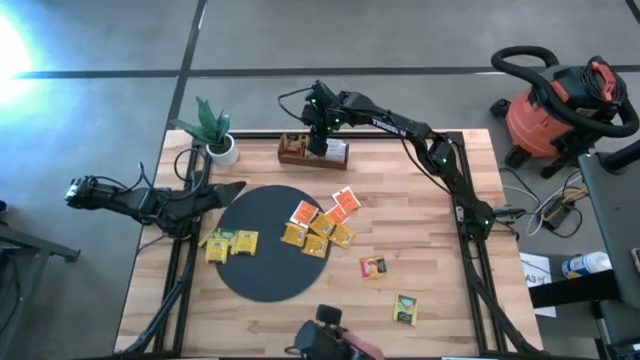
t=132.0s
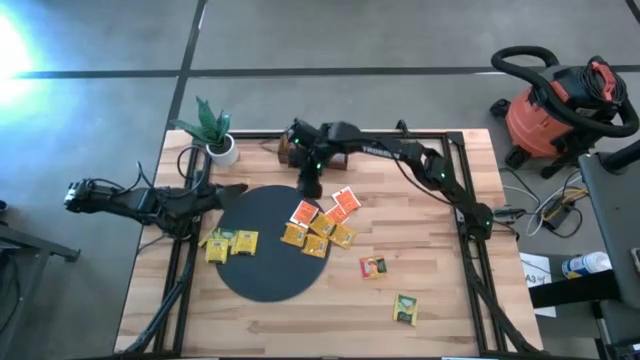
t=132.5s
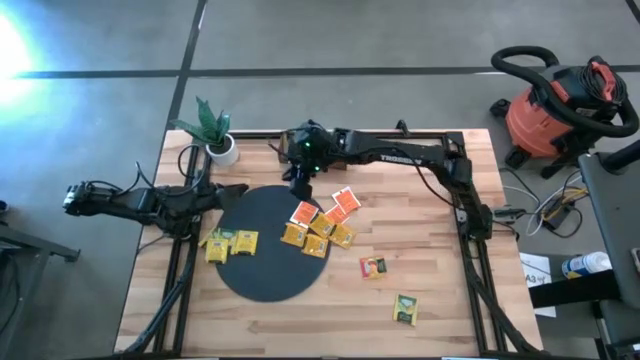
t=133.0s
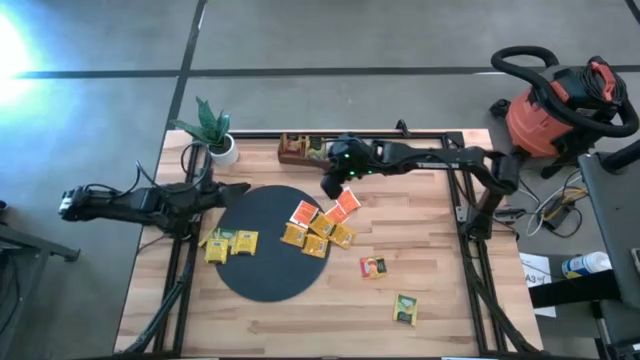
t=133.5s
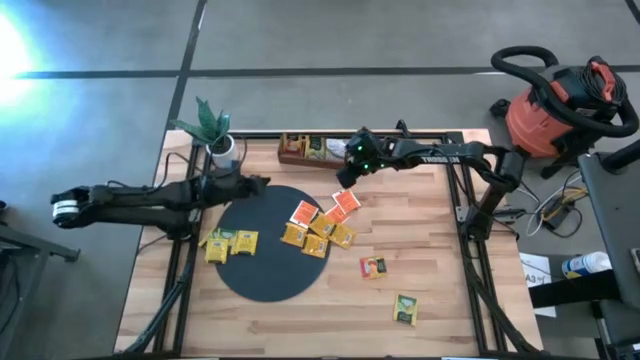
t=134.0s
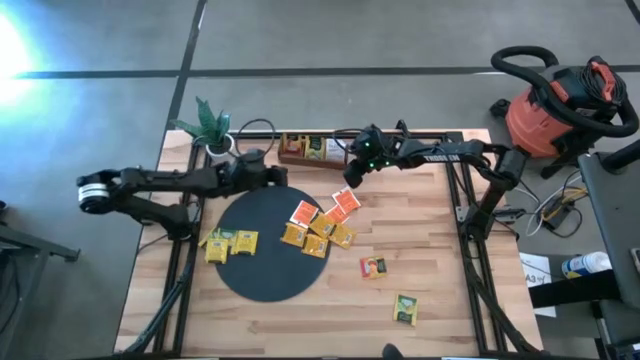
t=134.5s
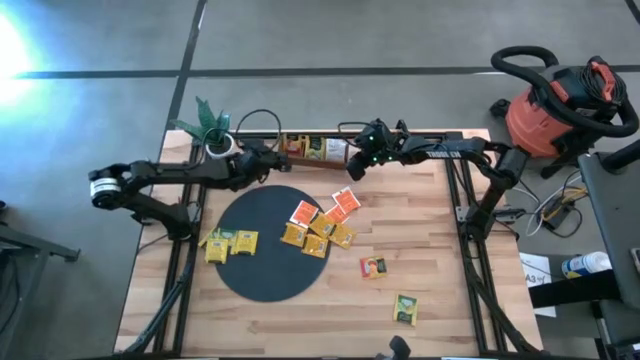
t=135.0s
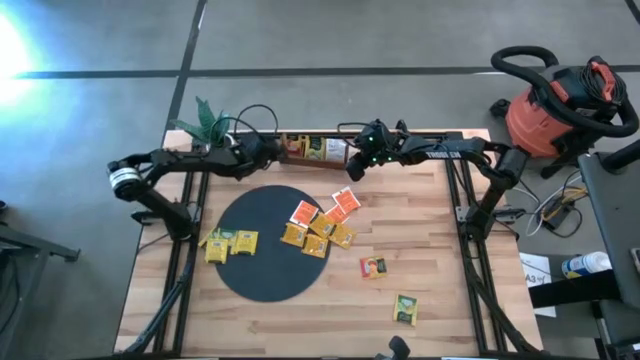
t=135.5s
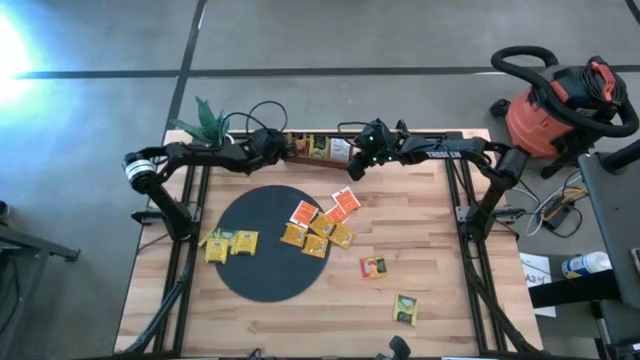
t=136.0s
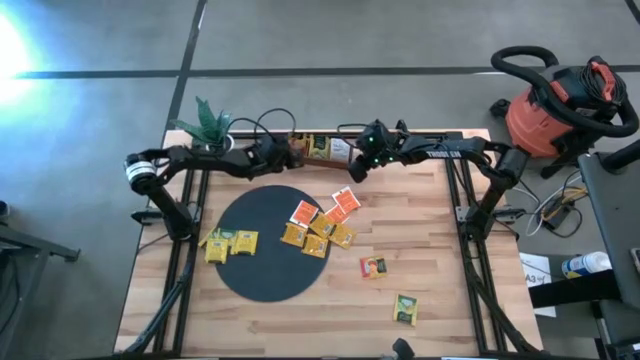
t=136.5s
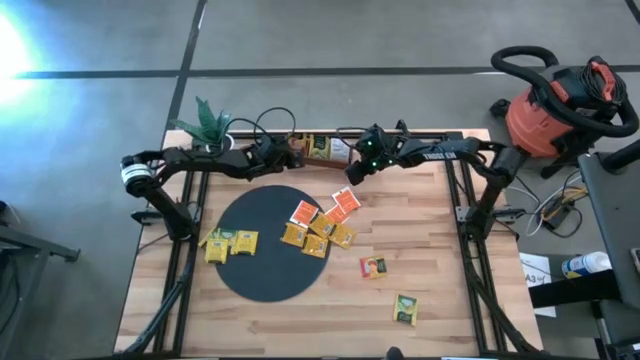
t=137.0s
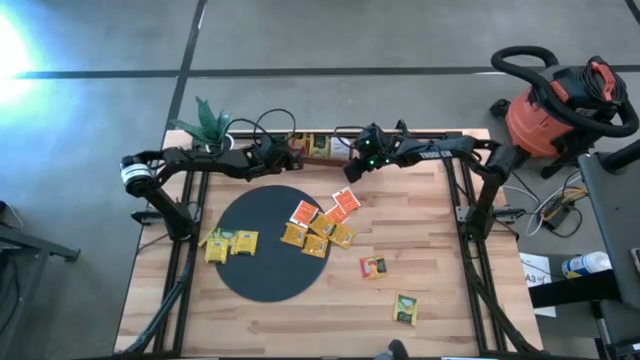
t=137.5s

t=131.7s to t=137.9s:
Task: Pick & Place Tea
Adjust the wooden organizer

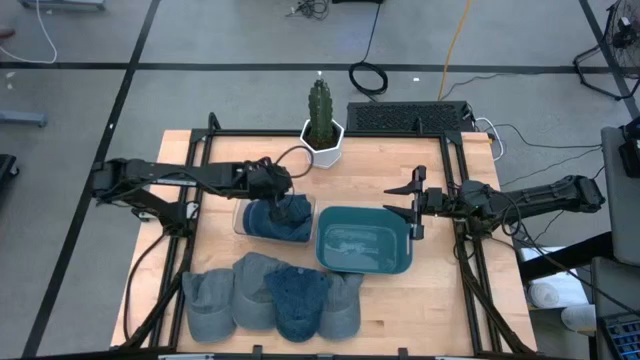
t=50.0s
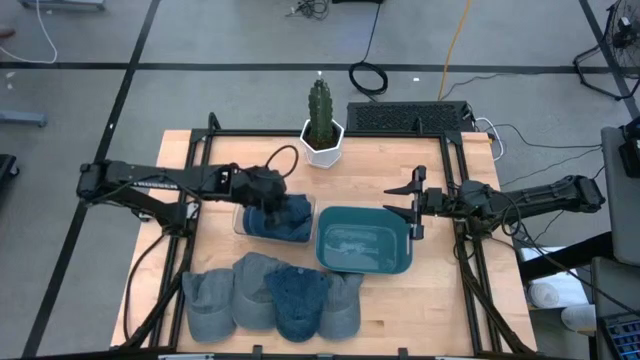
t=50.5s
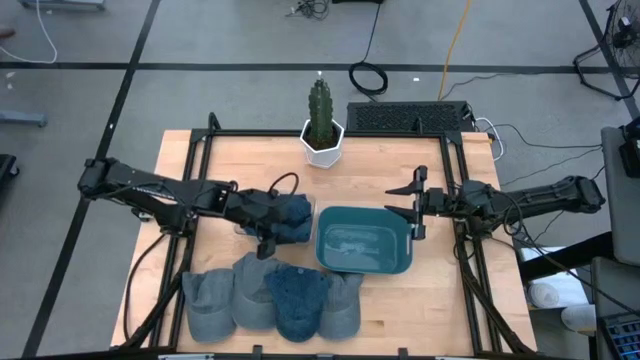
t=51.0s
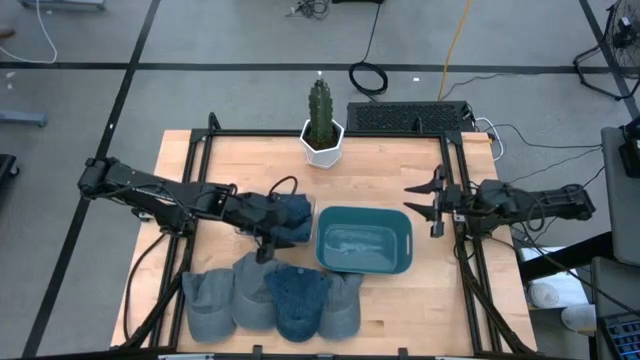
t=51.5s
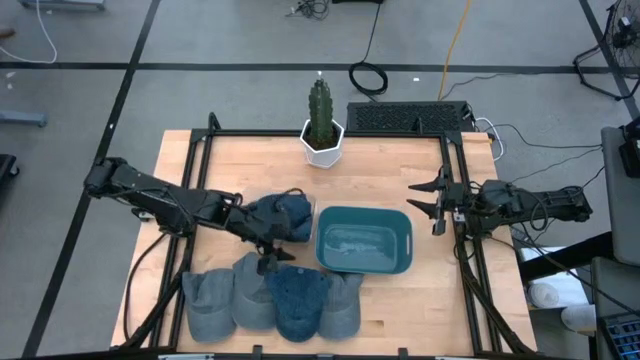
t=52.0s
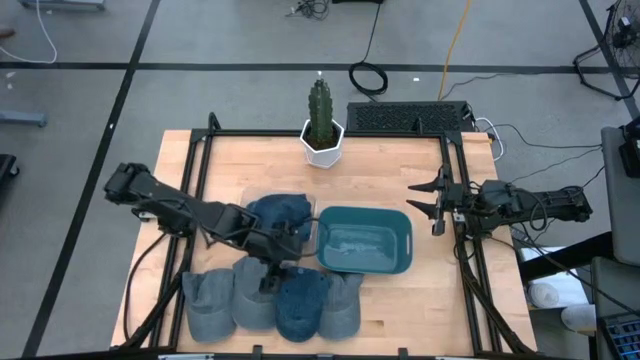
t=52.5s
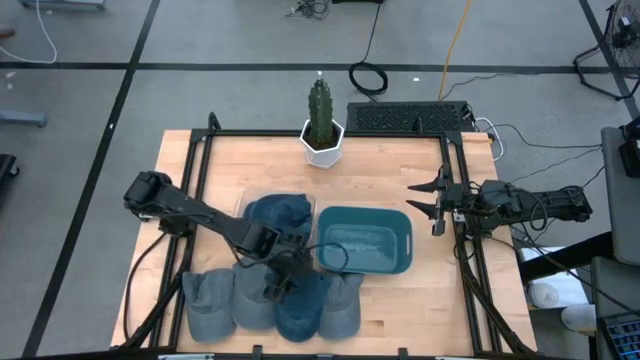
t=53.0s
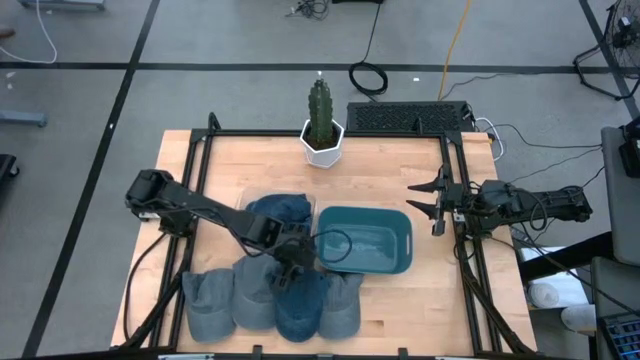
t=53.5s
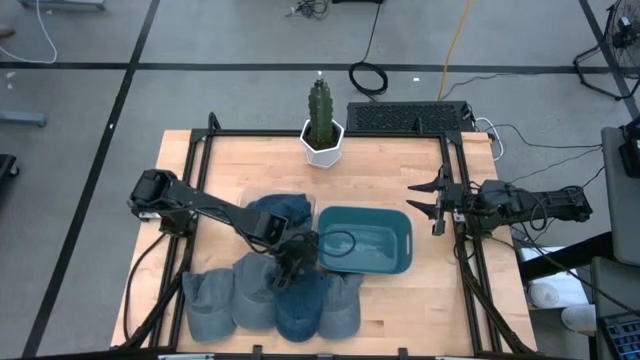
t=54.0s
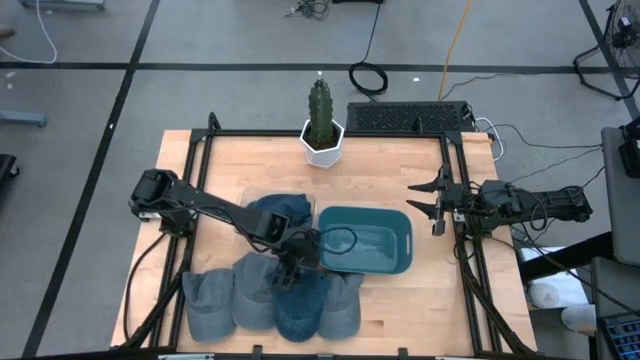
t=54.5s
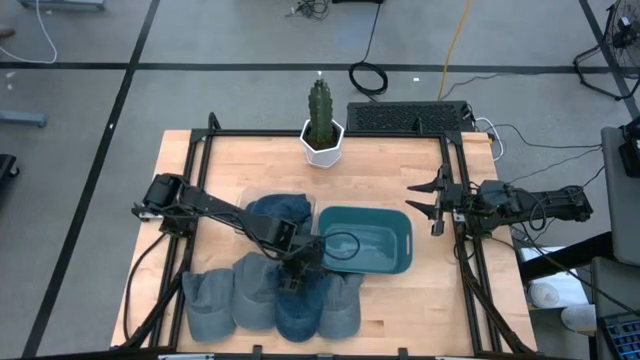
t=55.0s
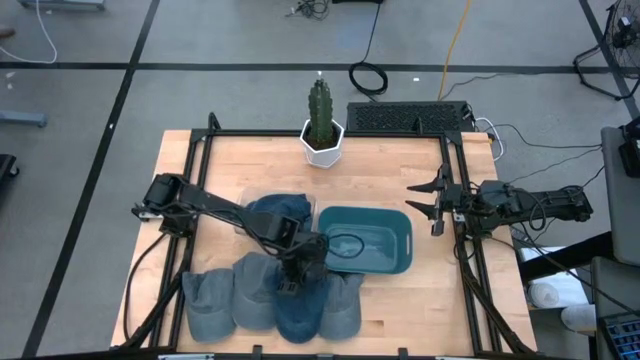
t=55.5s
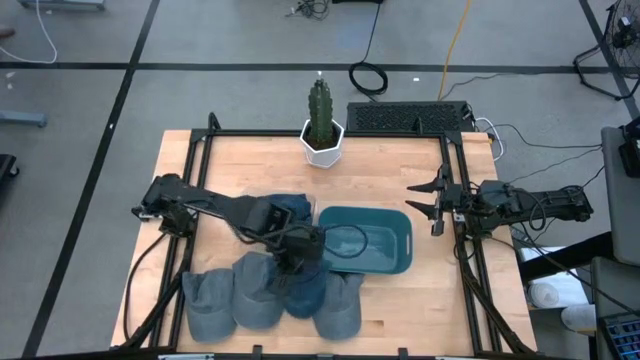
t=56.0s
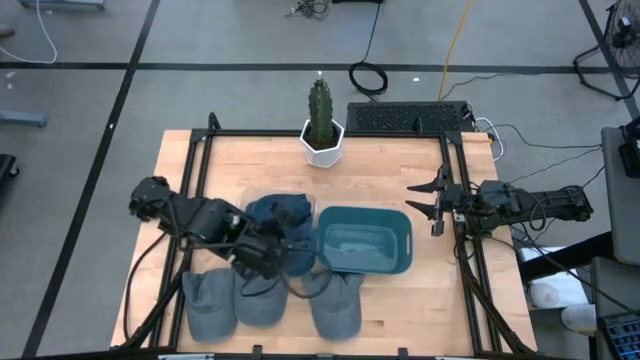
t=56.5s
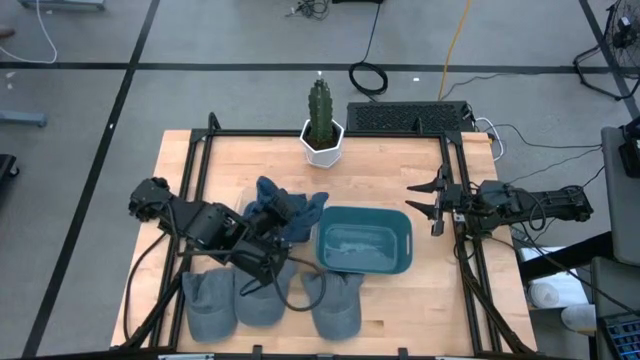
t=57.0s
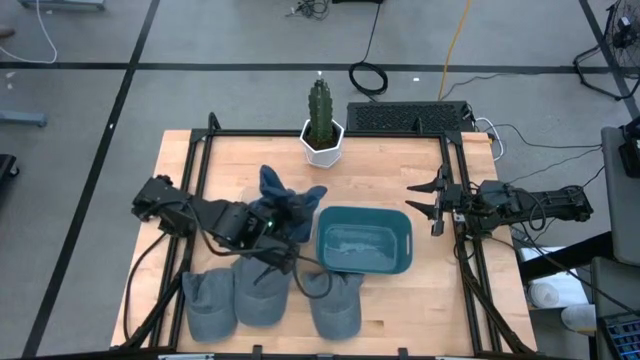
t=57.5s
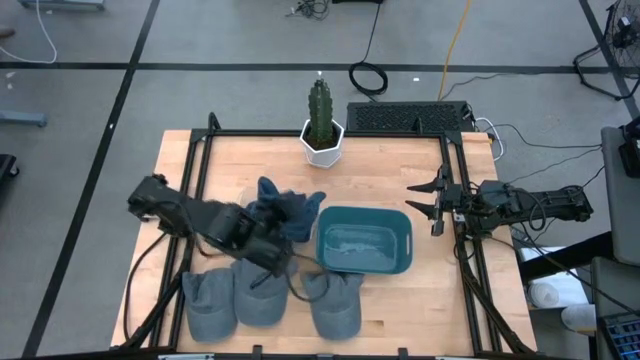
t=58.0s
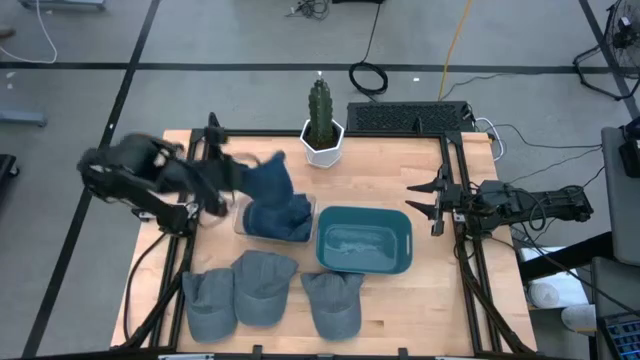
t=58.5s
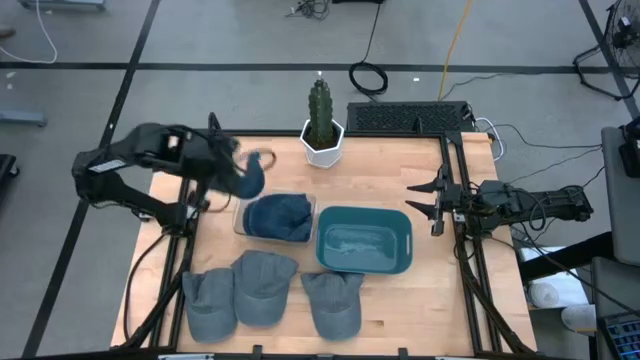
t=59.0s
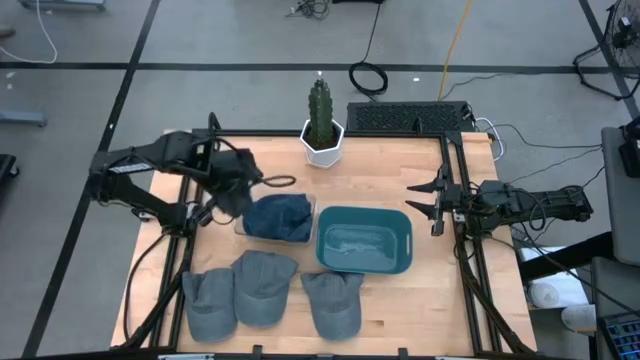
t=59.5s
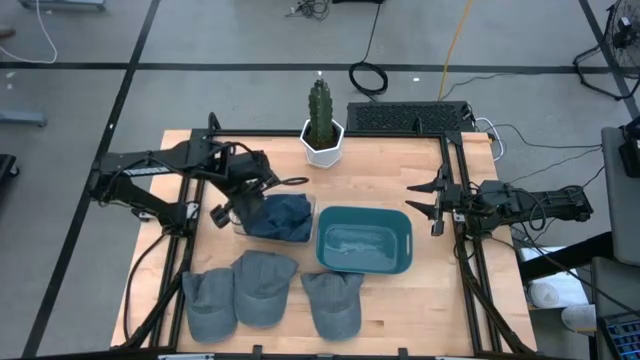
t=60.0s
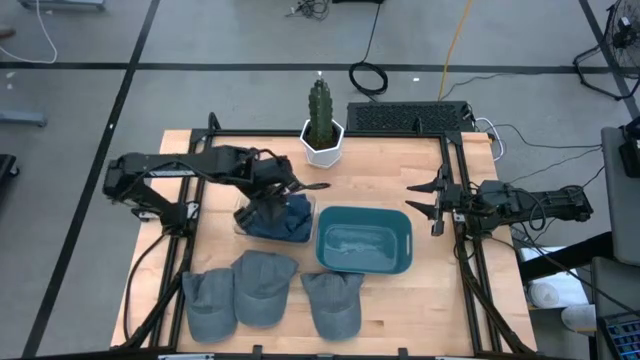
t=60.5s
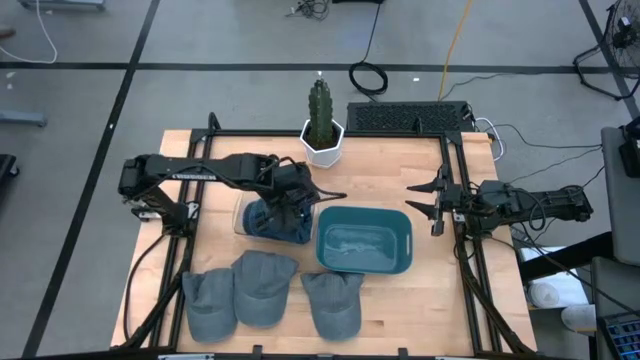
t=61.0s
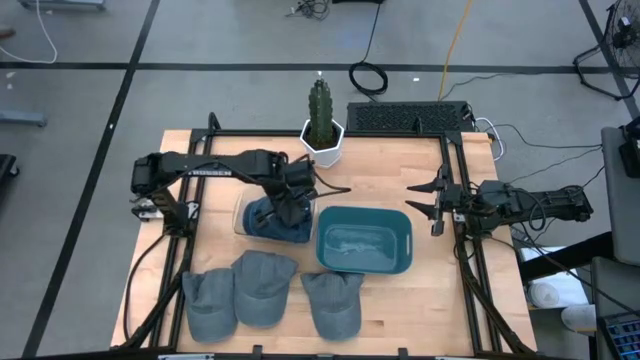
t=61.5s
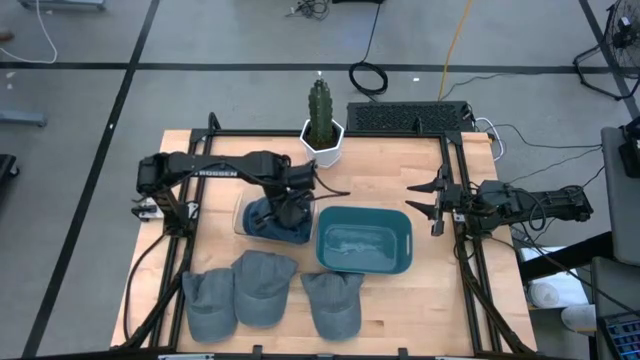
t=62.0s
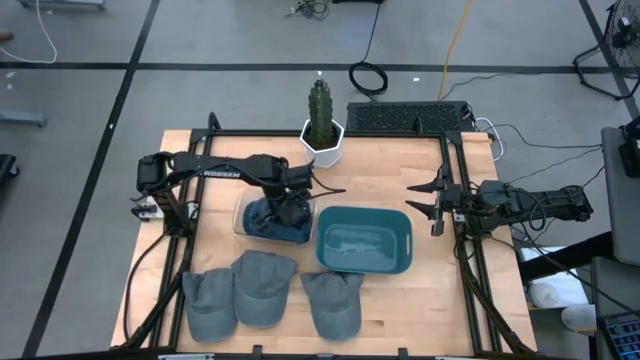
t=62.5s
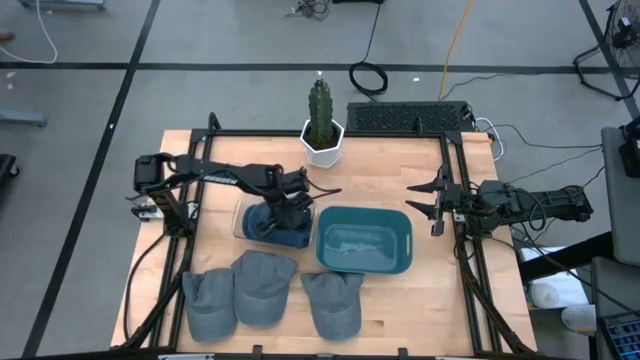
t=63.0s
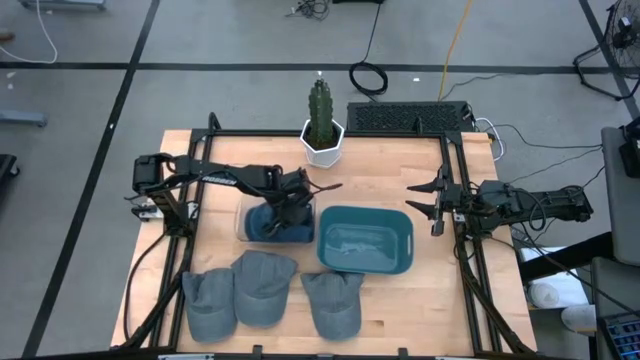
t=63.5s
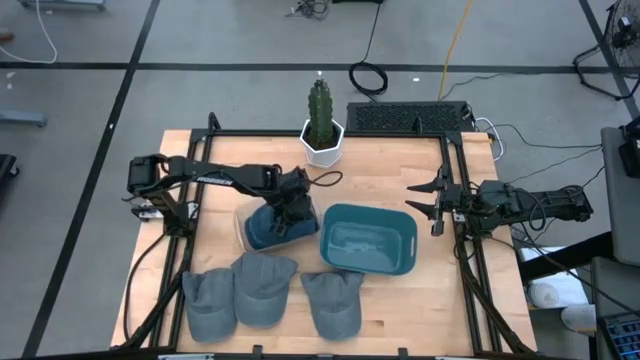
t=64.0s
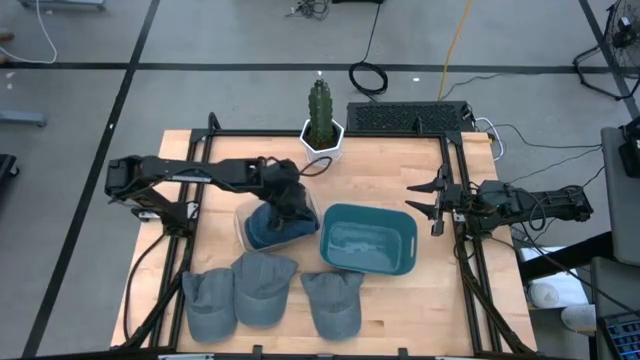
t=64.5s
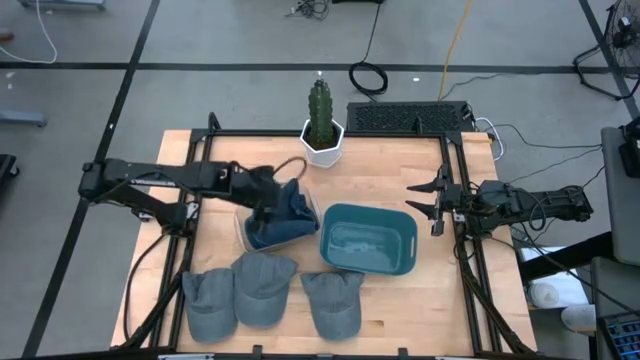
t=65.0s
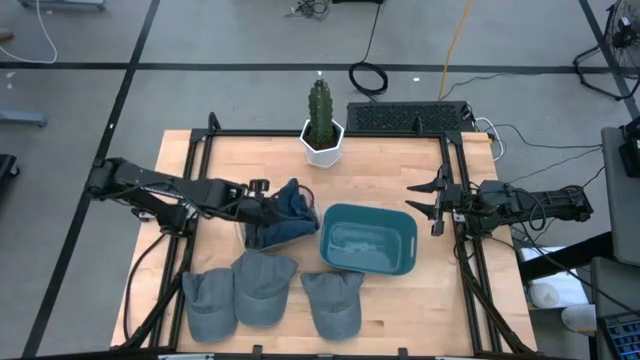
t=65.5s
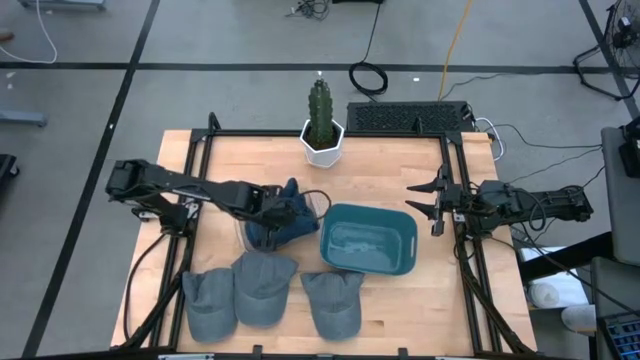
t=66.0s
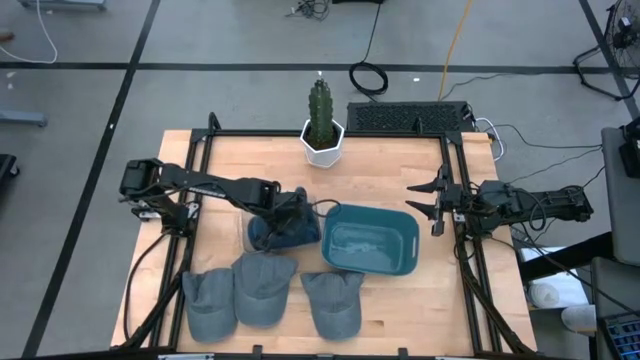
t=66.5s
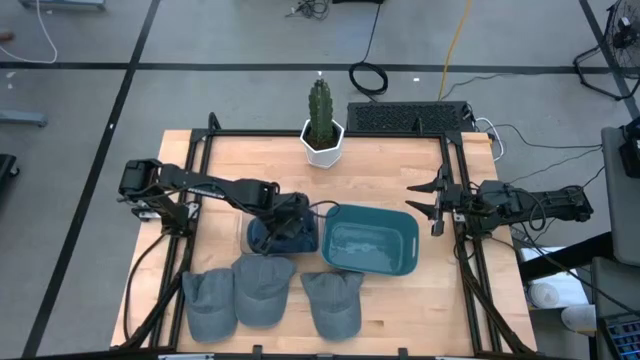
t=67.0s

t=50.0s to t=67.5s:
Task: Pick & Place hat
Put the blue cap into the transparent bin
